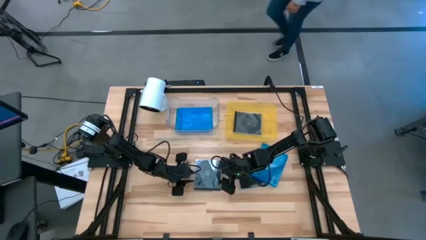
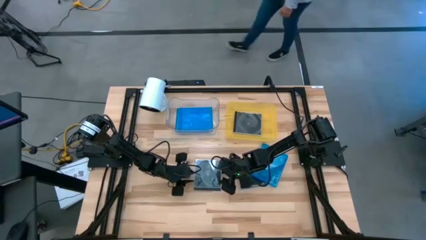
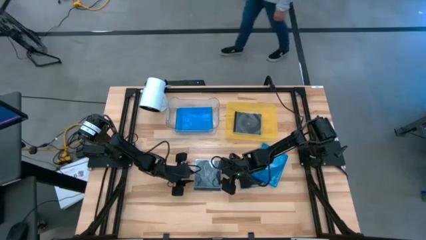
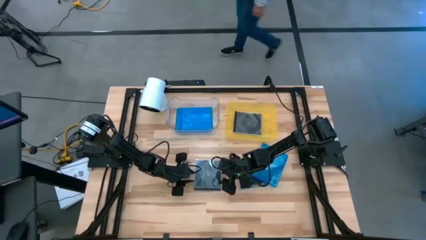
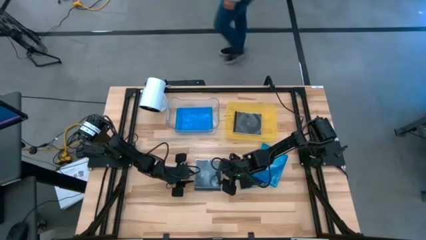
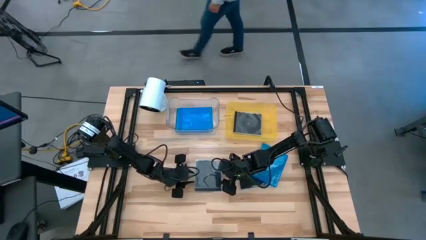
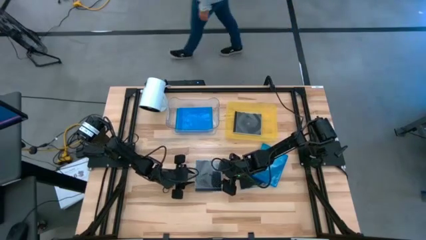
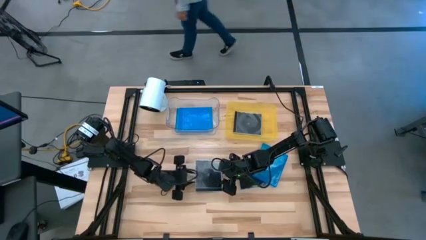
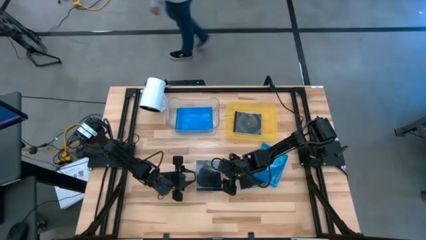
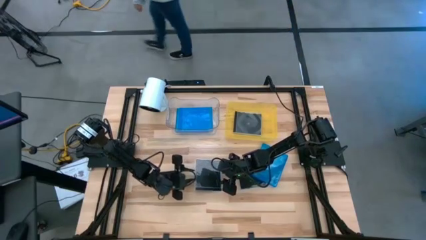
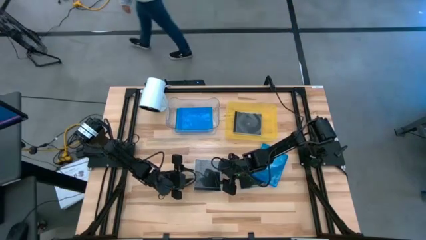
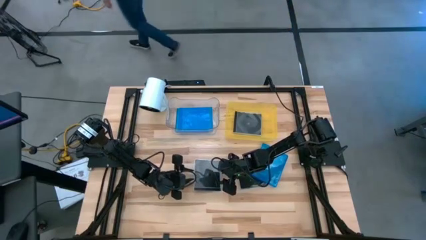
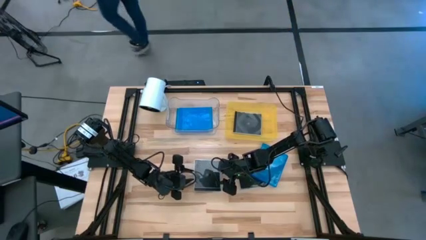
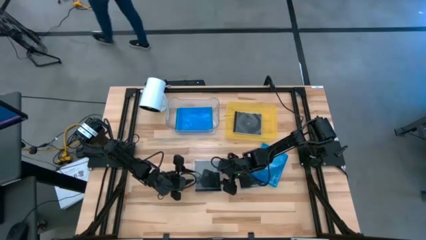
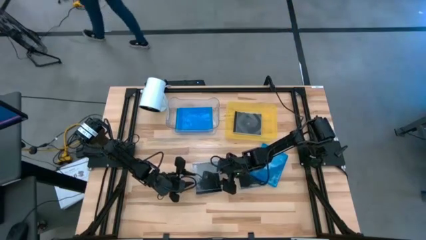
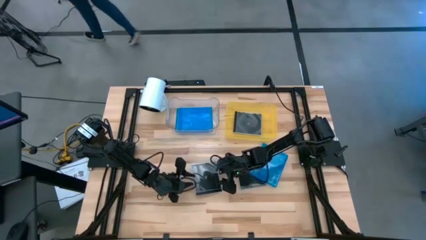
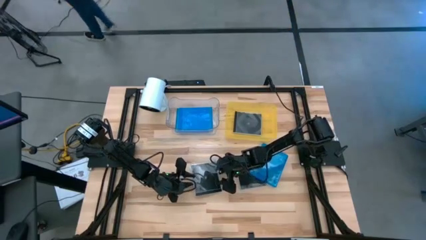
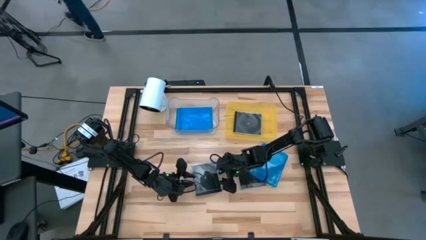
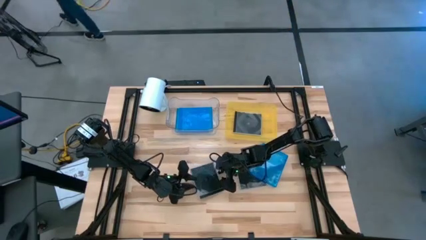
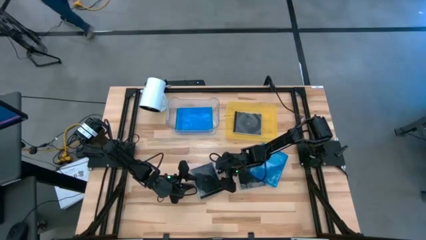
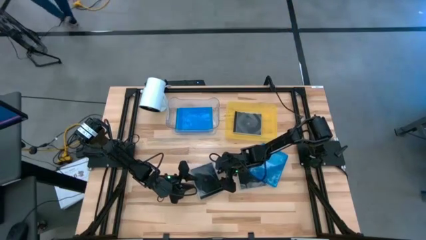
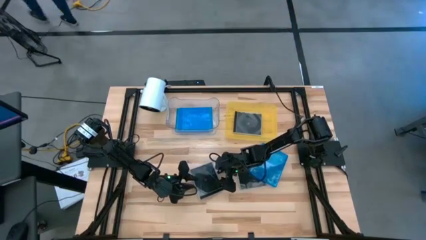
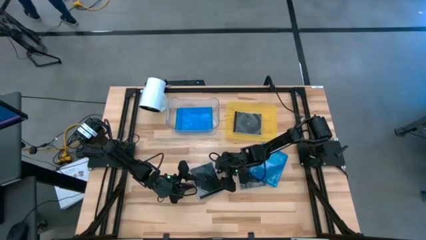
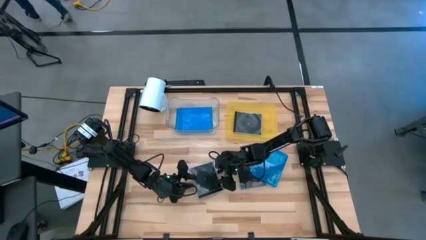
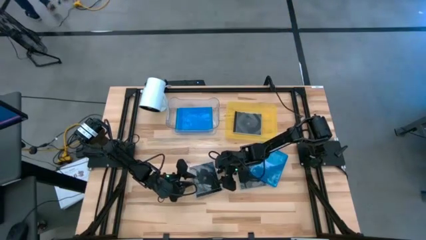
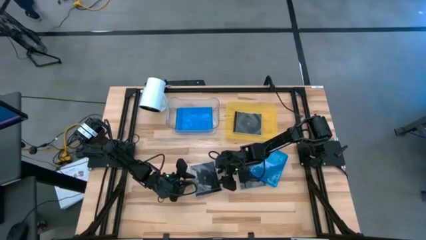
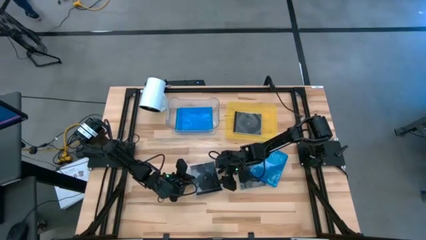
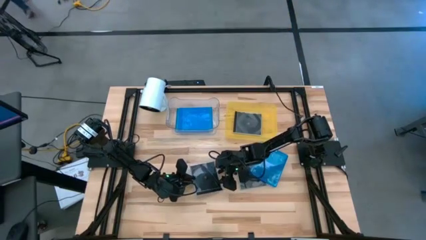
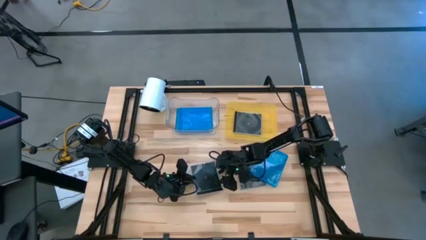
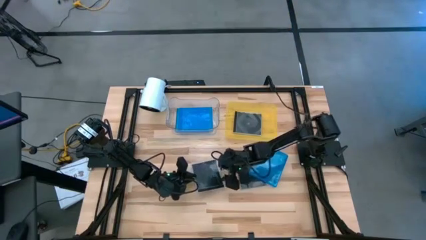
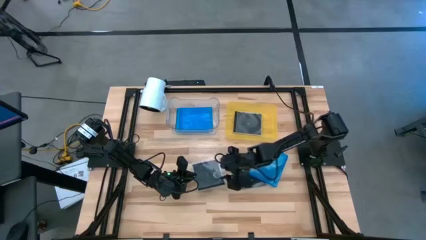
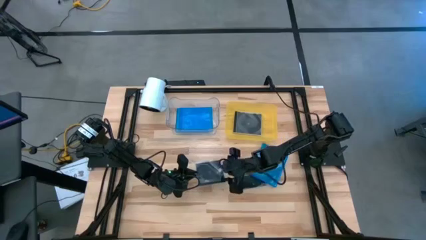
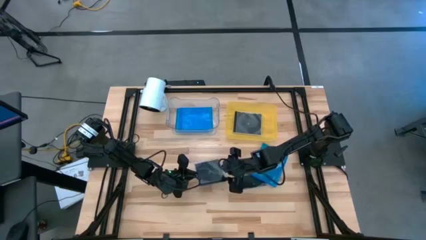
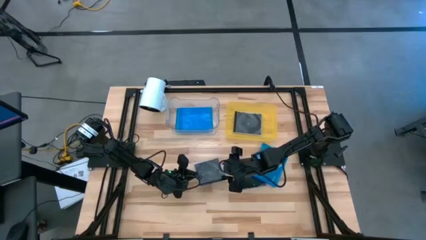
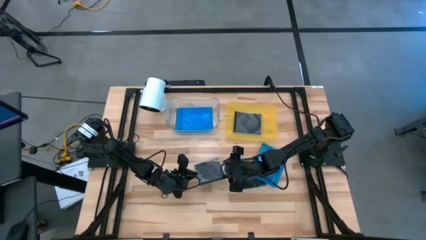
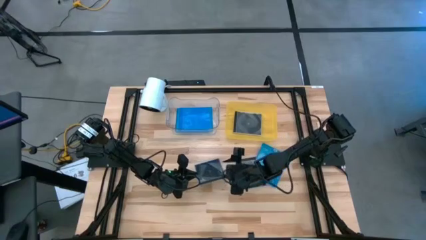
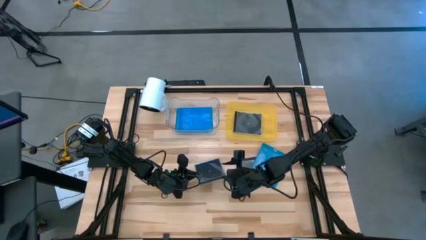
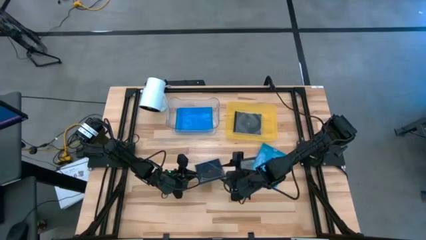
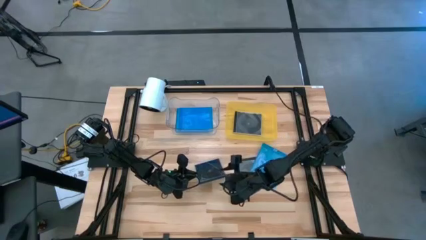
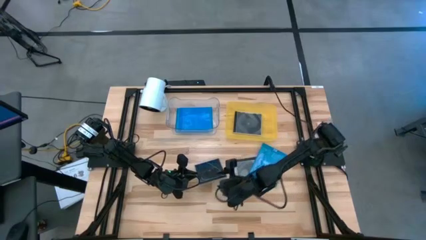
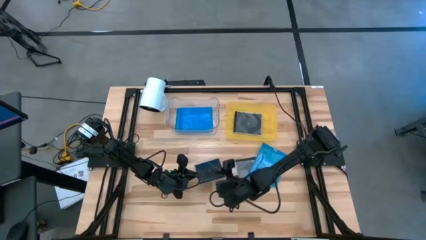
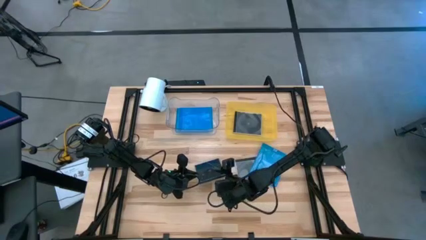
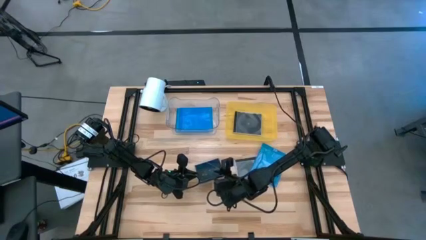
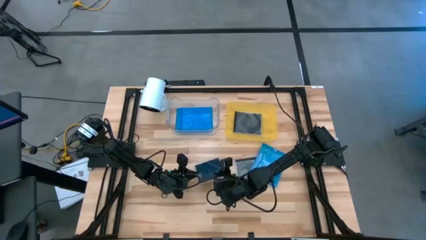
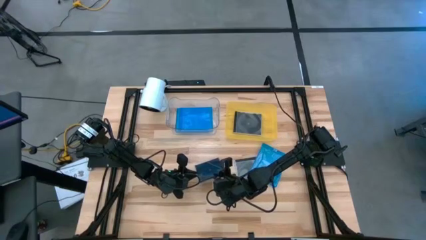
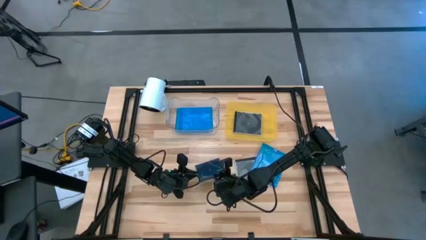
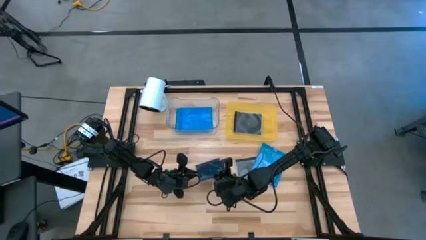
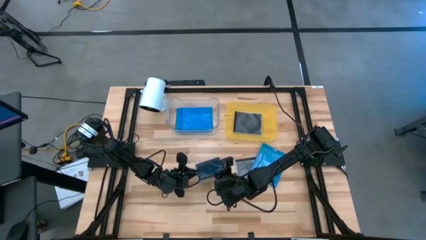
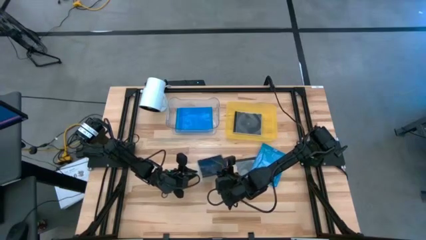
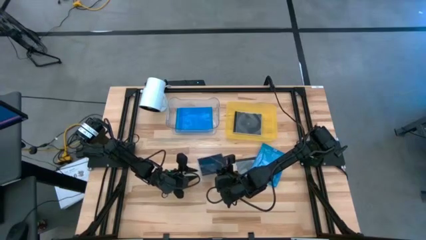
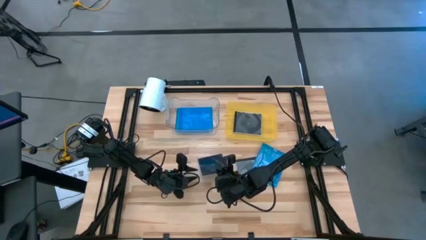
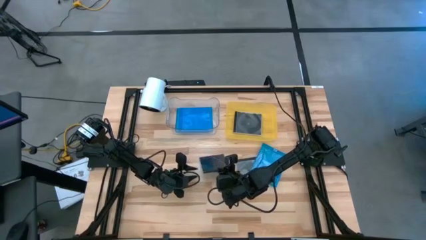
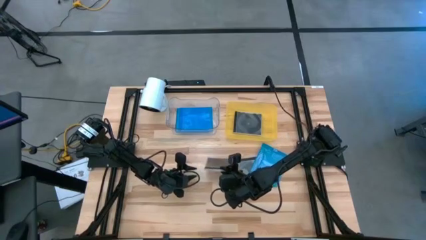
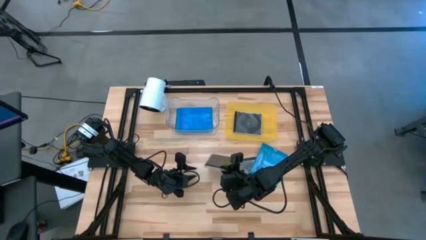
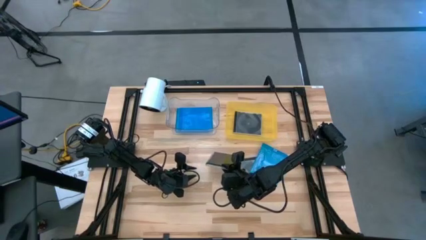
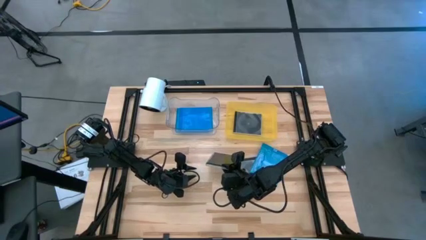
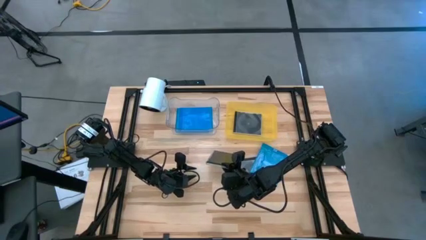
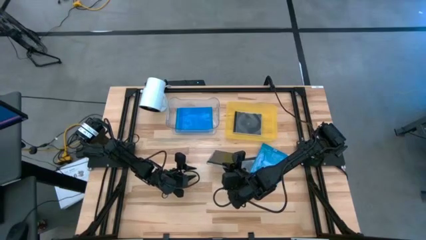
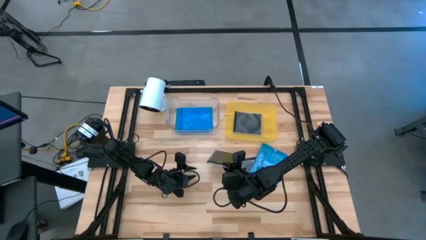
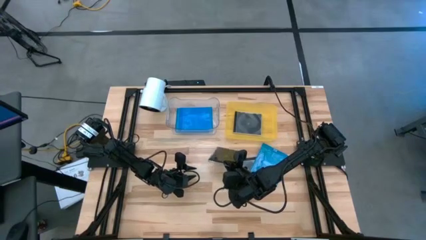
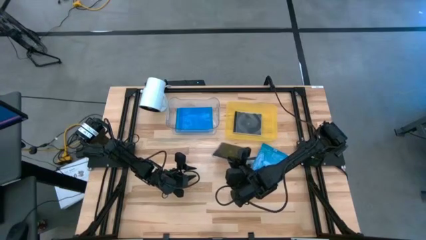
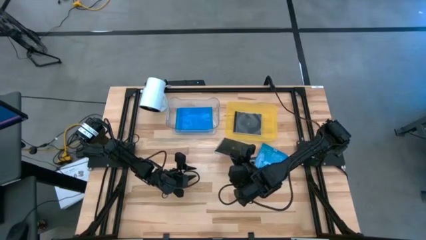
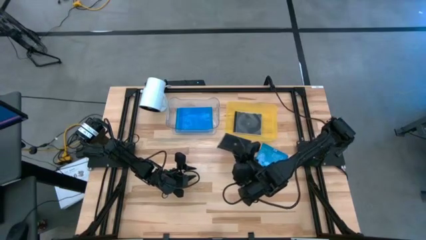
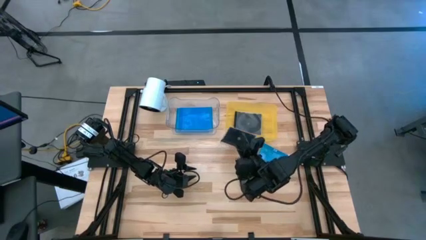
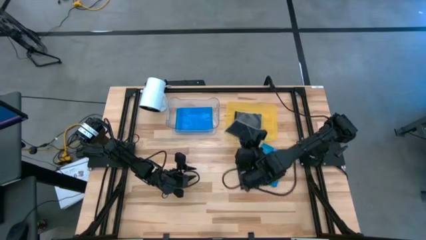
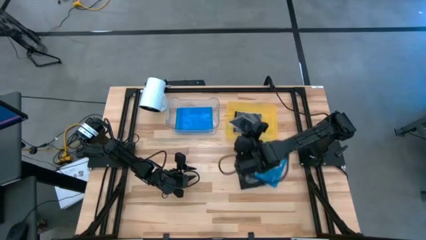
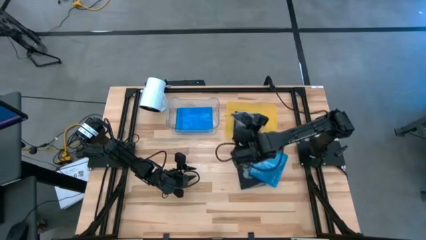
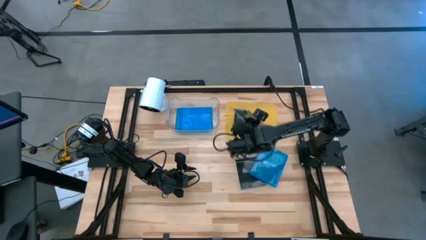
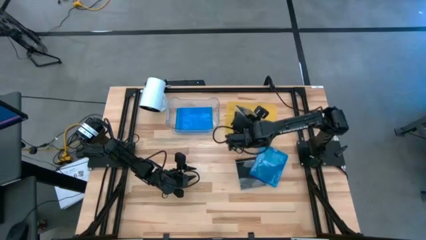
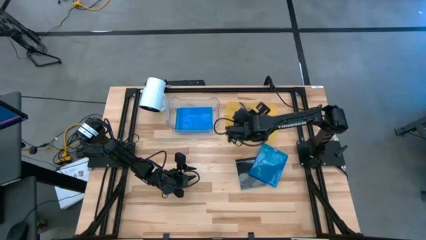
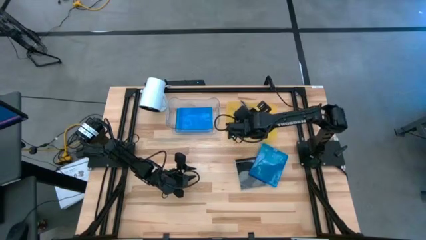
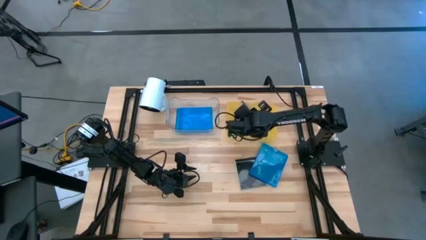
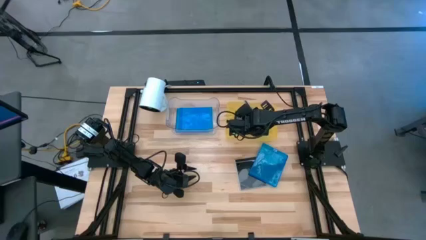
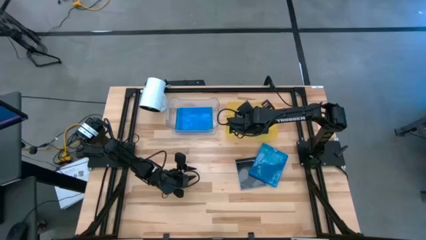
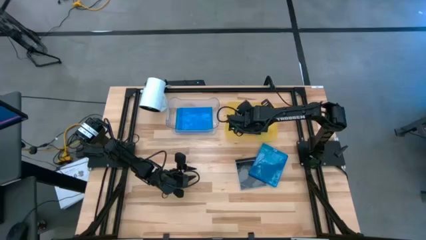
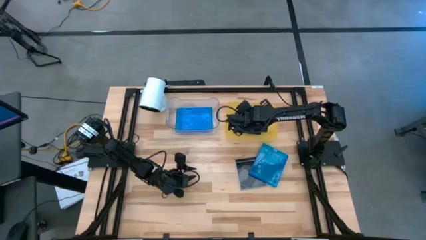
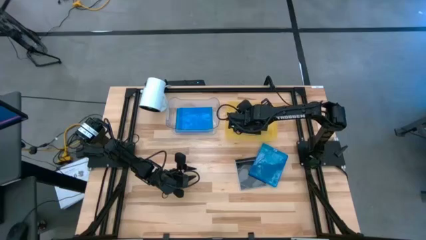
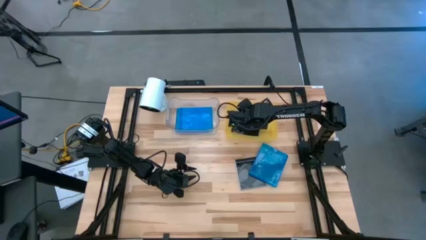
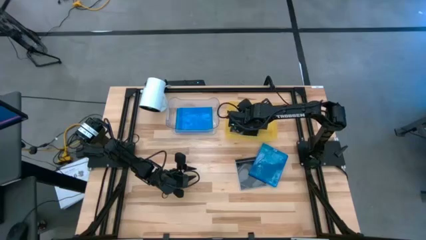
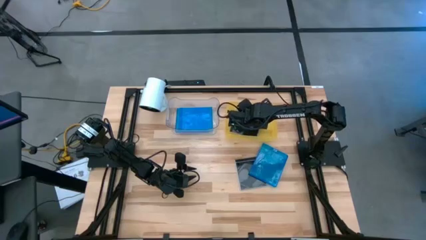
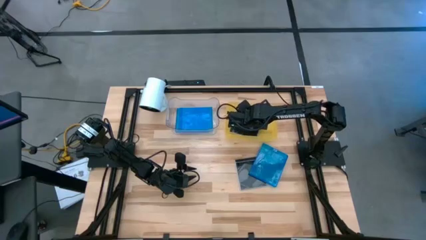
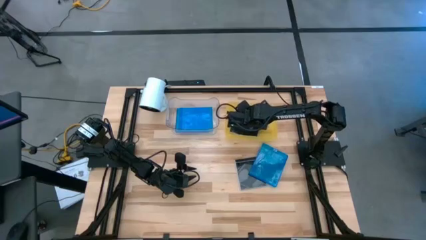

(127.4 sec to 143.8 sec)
Task: Pick & place jewel cases by type
Put the left black CD case into the yellow bin
